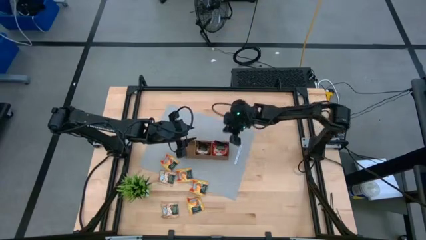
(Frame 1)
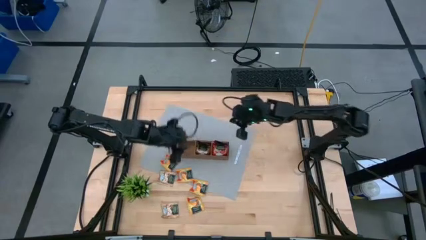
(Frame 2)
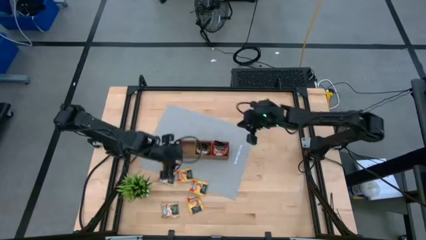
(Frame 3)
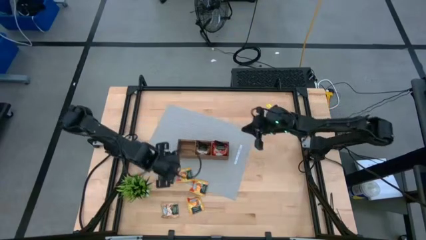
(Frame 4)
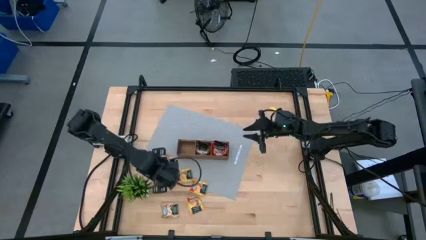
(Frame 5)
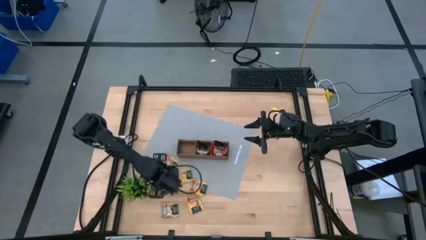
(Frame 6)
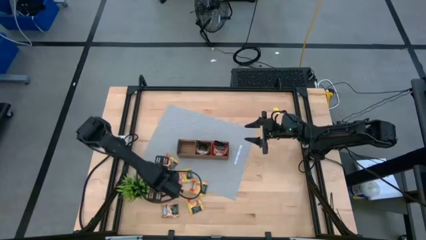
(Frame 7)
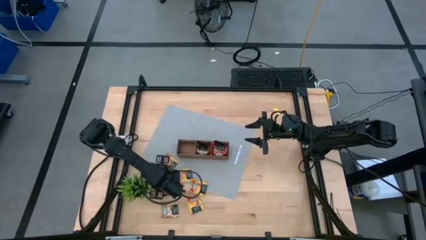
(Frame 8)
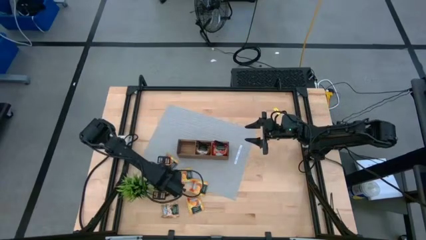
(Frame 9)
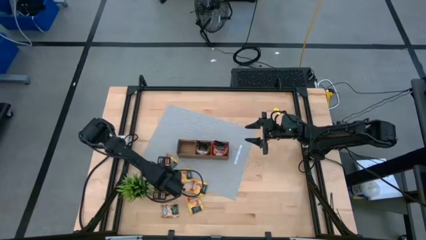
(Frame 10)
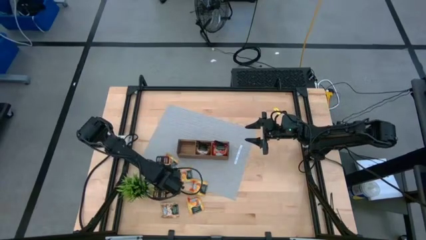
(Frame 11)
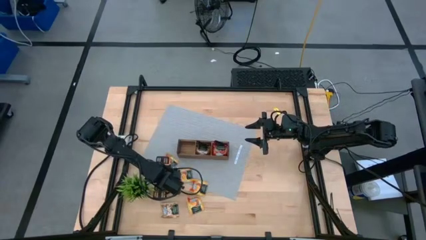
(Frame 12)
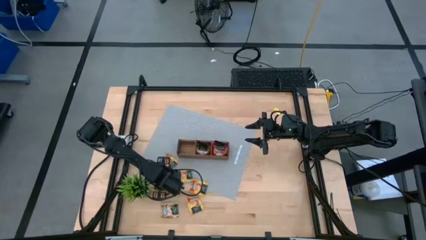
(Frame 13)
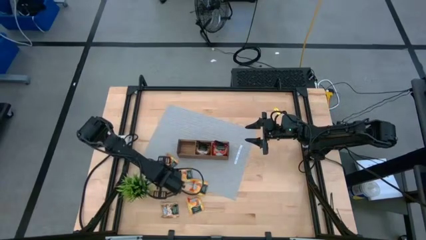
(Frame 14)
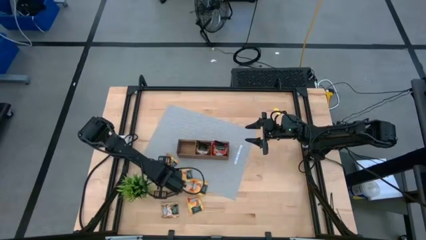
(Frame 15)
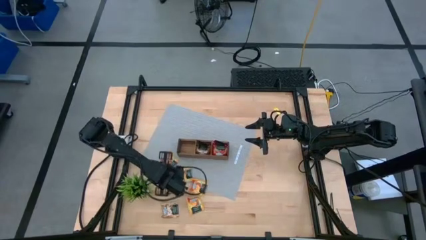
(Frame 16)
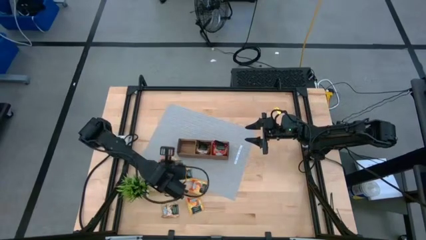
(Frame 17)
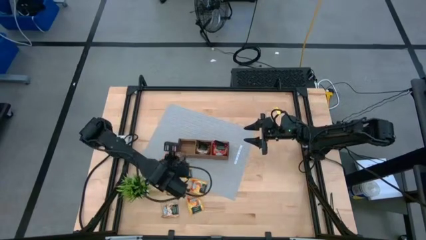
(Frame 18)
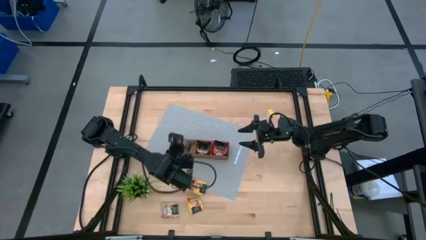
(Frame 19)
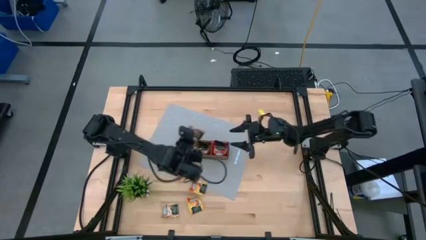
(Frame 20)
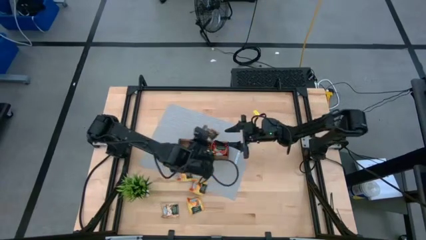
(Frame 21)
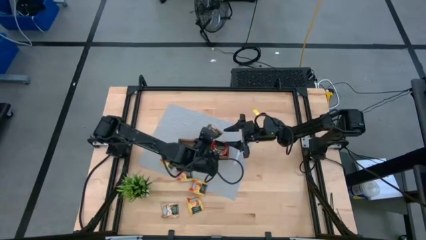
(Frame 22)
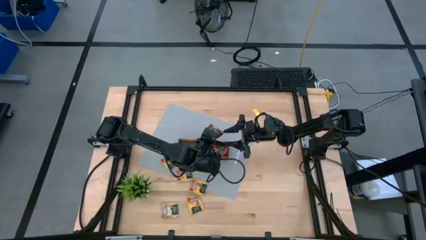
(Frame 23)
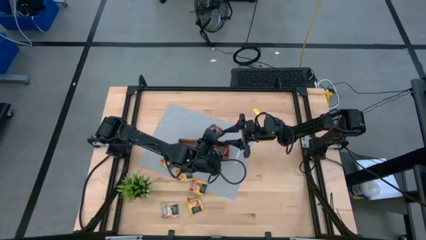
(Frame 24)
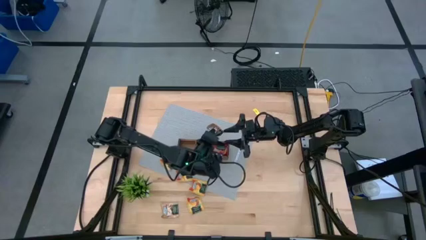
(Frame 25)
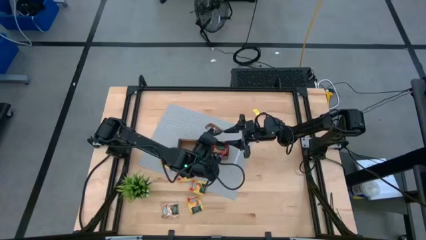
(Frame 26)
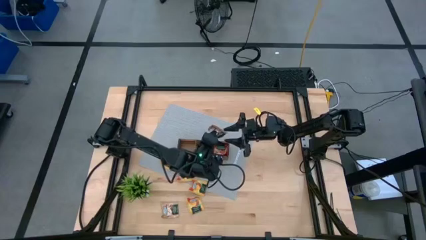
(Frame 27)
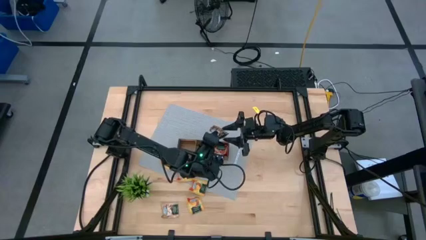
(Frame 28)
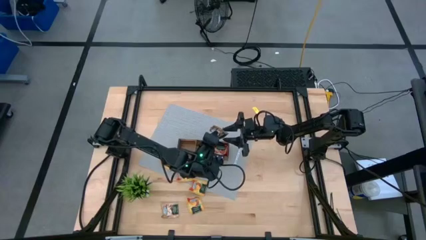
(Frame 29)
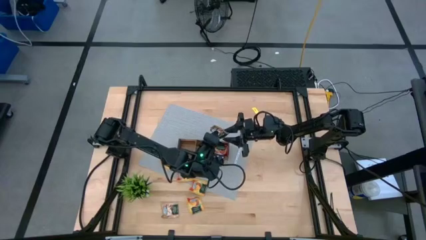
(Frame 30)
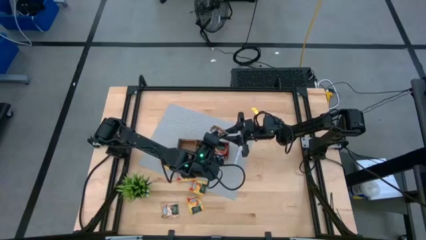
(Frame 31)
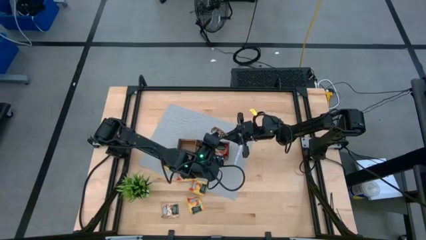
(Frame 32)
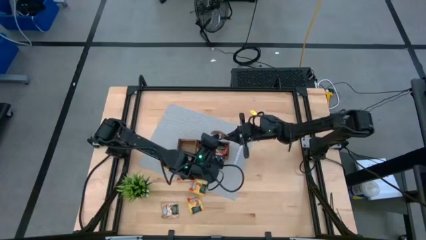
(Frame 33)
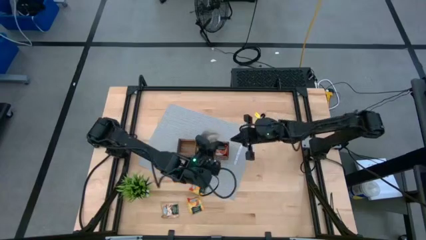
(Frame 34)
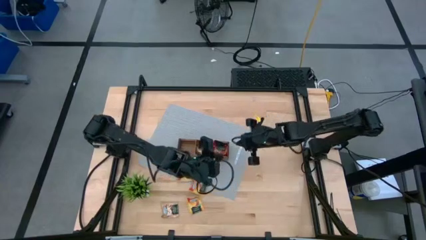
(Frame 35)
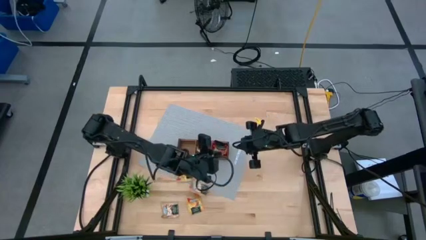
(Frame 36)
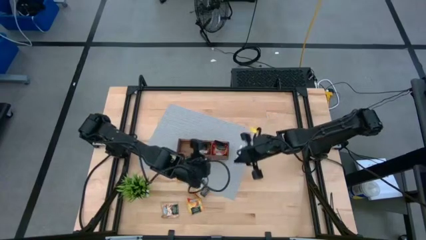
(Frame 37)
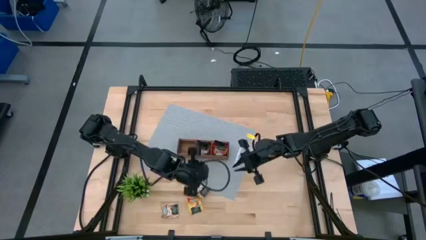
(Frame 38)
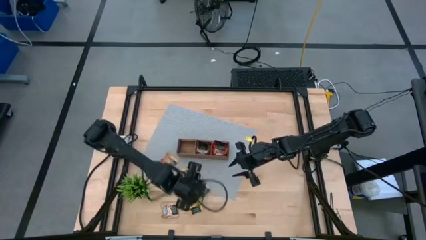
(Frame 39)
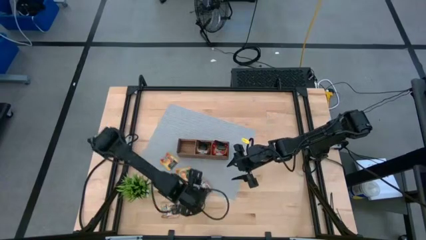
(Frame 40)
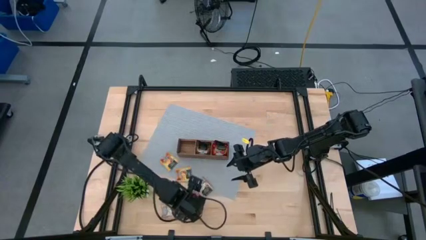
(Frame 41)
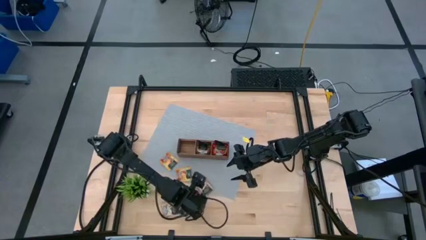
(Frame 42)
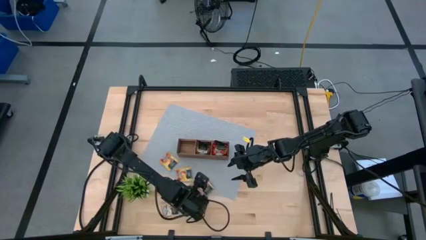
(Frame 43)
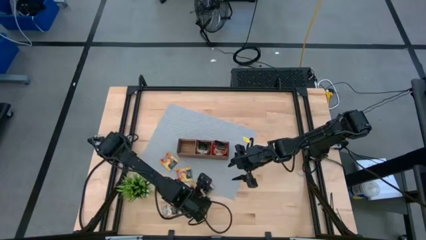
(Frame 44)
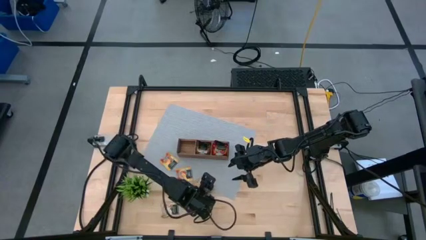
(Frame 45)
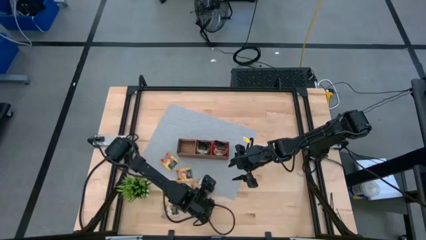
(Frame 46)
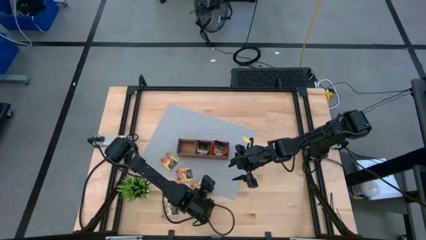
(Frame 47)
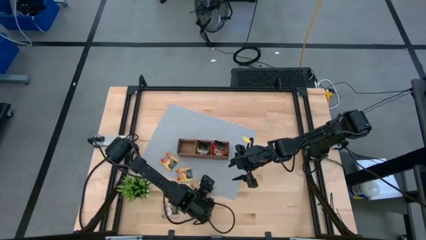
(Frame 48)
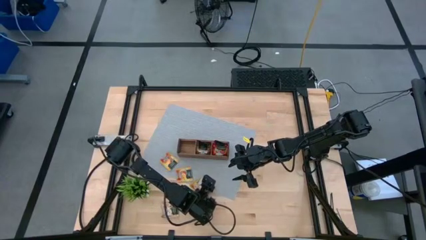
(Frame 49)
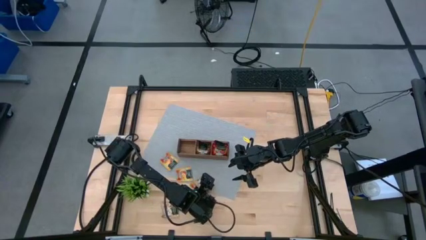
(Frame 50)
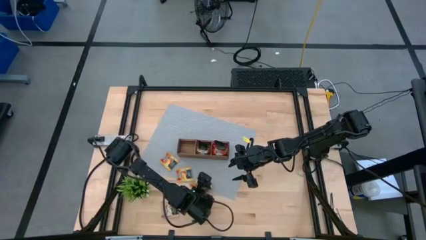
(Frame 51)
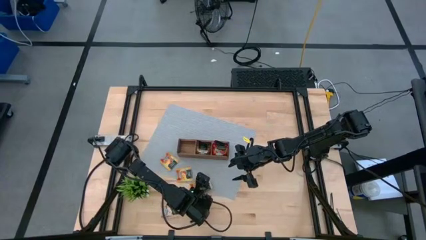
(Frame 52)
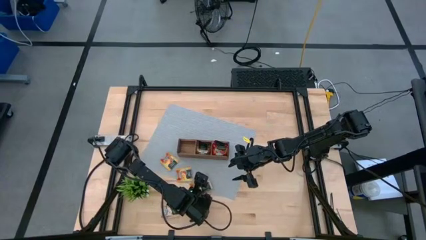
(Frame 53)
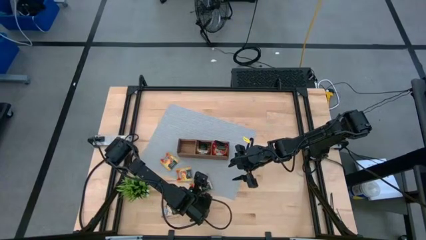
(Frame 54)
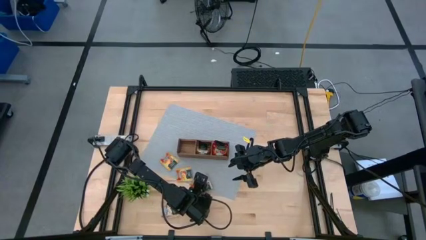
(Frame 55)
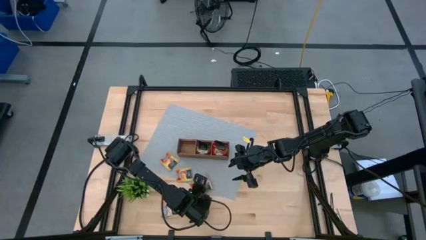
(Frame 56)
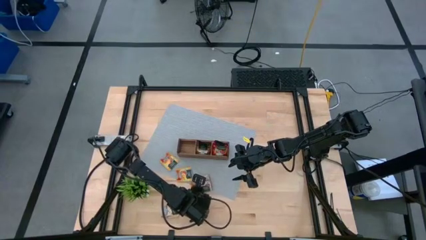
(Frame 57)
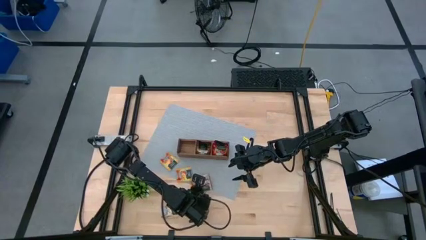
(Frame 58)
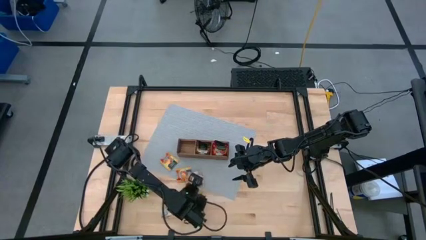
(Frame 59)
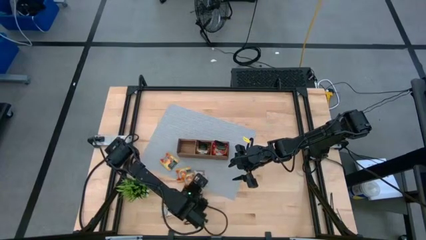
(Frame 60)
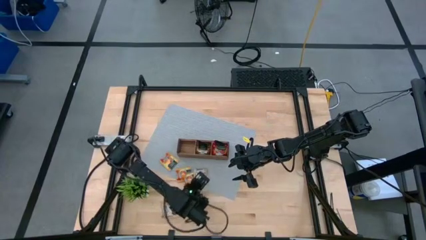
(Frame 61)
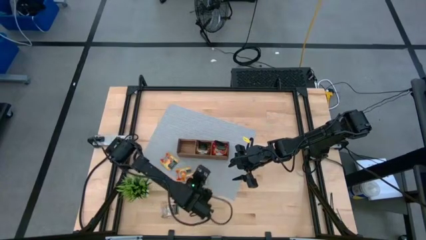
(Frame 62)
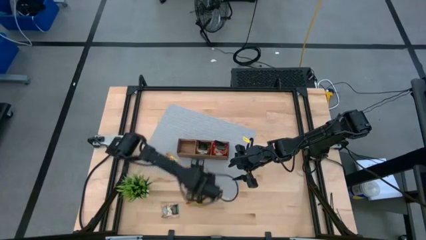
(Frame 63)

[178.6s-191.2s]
Task: Pick & Place Tea
Put the brown tea bag into the wooden organizer

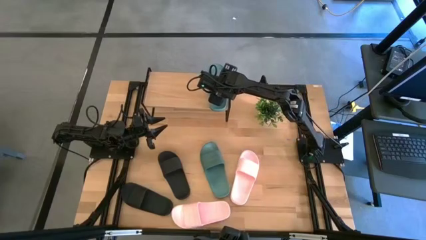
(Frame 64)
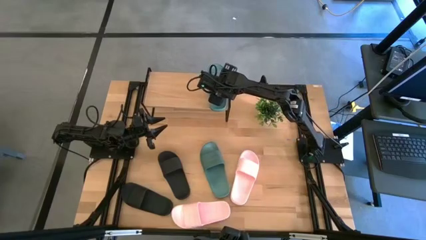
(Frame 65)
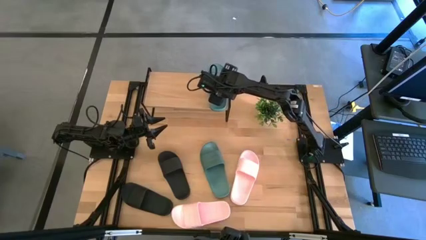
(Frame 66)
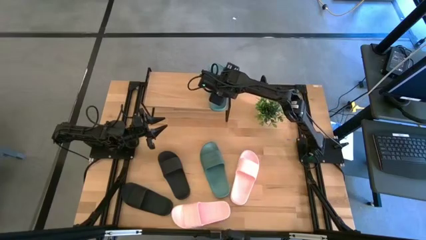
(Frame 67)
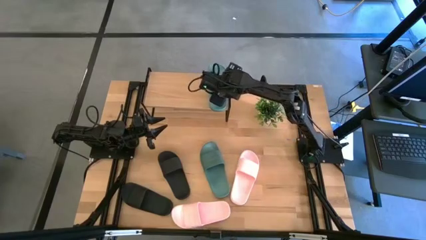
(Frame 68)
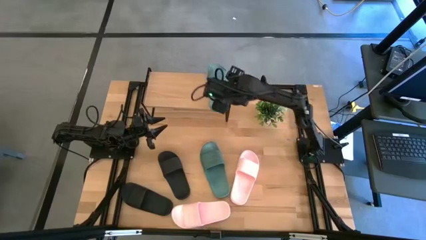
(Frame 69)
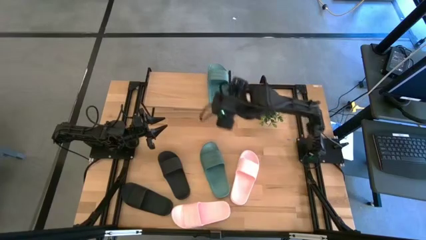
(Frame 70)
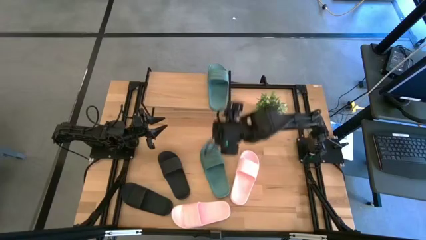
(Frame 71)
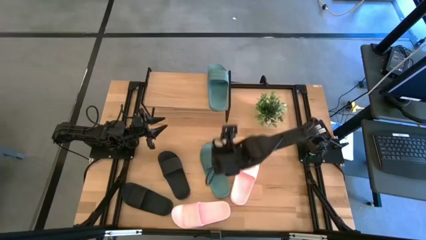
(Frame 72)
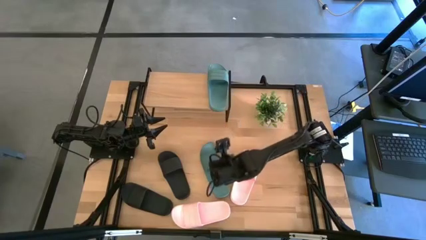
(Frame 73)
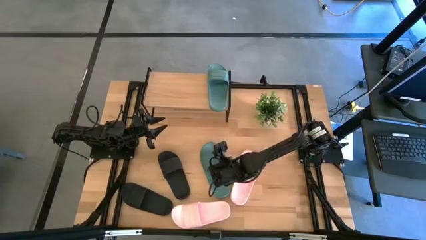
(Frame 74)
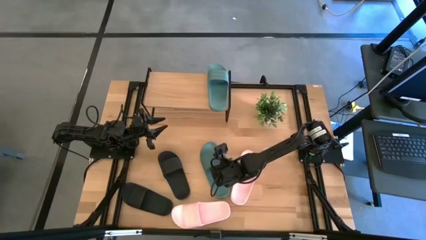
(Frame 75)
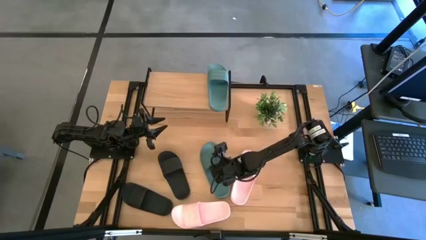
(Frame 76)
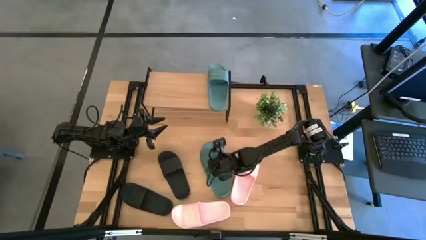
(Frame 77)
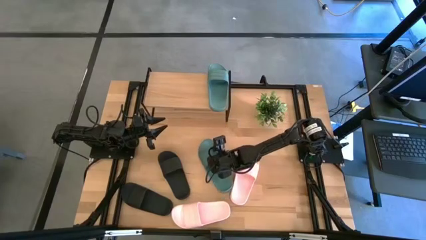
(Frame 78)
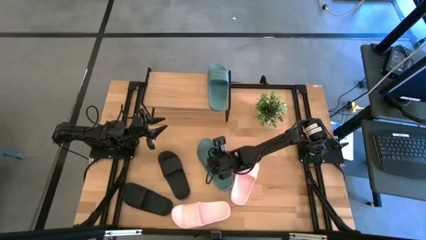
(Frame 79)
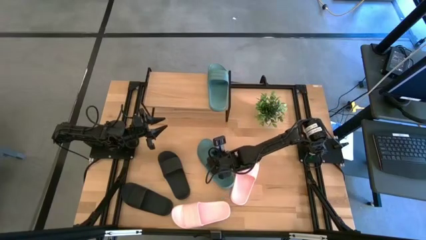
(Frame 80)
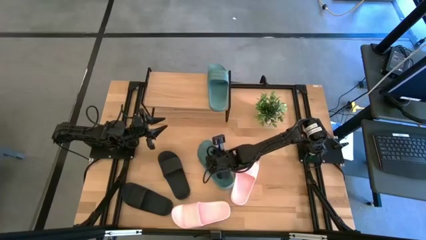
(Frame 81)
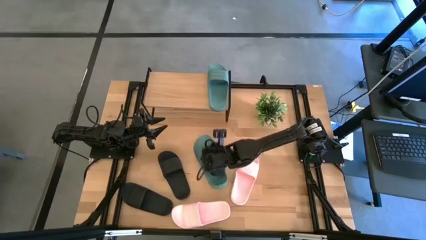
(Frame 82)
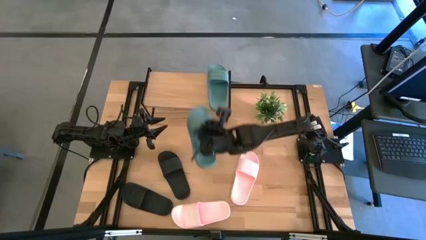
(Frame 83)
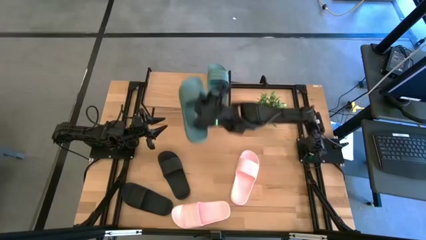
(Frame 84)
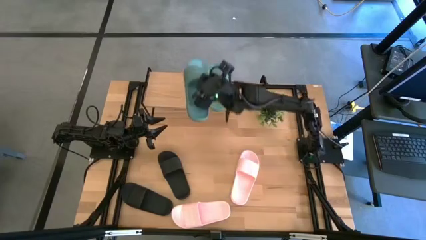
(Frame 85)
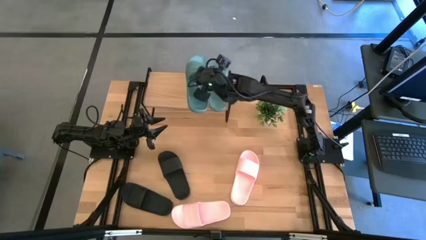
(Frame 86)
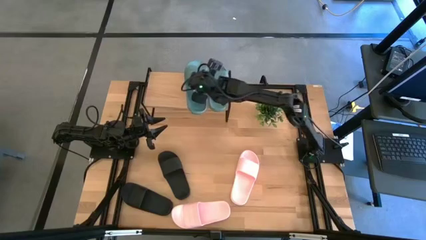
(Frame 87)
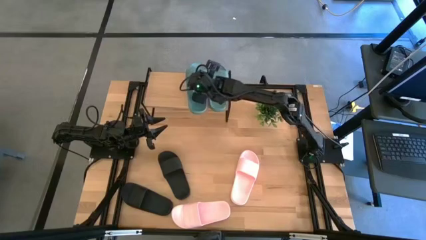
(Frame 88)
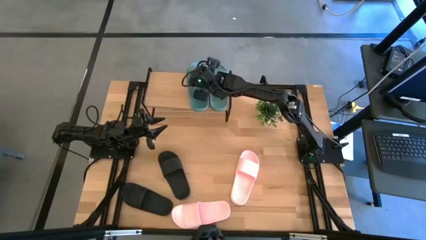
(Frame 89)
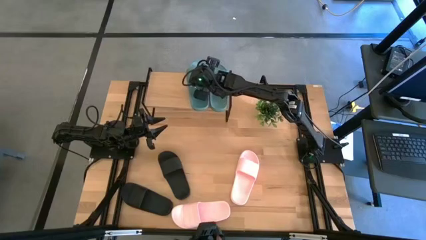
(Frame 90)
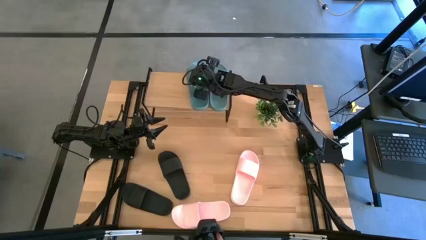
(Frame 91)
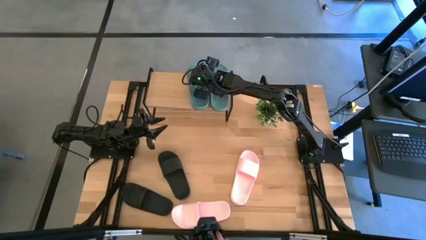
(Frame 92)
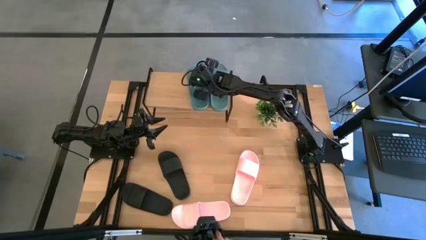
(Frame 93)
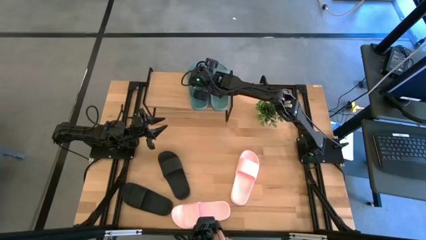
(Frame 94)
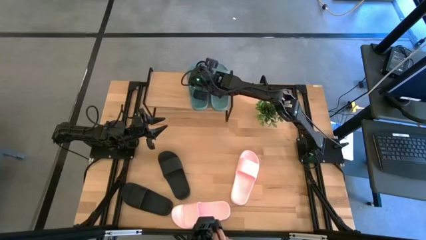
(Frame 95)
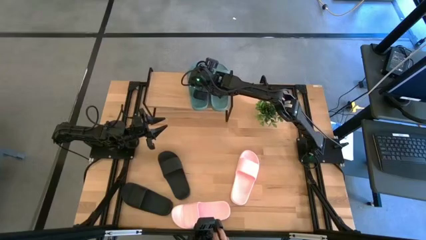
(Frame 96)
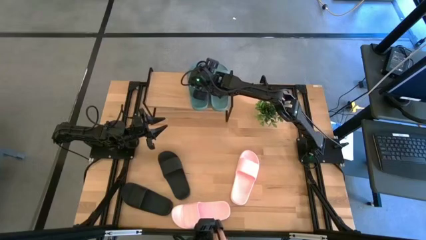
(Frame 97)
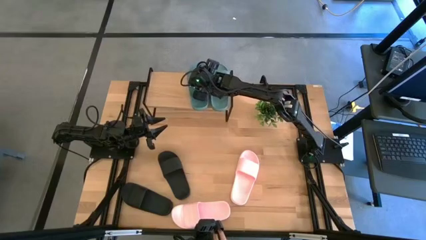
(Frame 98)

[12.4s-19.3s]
Task: Pick and place slides into the shelf
Put the light blue slide on the shelf
